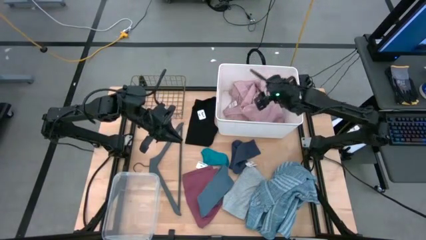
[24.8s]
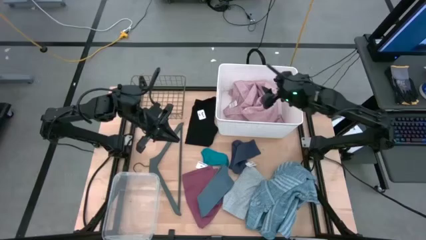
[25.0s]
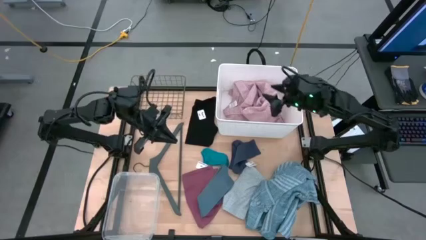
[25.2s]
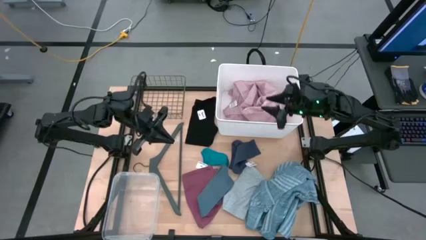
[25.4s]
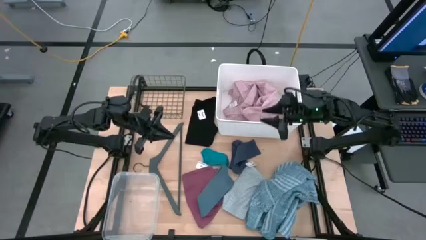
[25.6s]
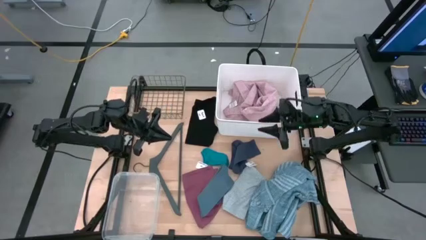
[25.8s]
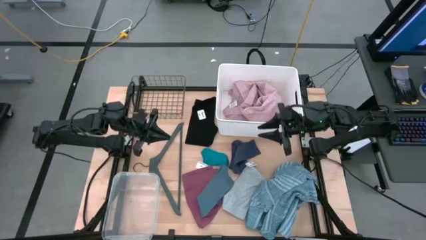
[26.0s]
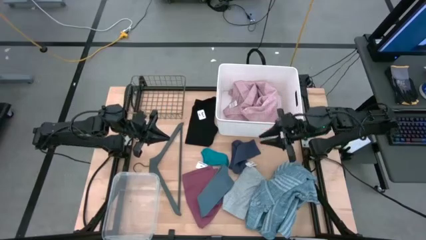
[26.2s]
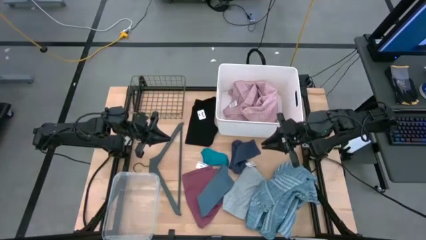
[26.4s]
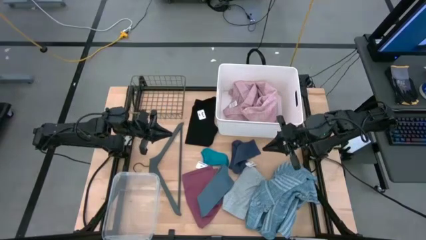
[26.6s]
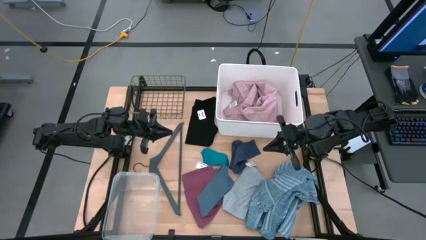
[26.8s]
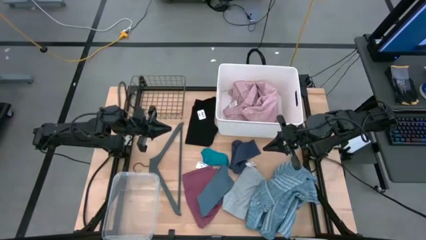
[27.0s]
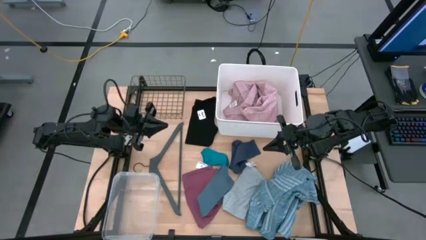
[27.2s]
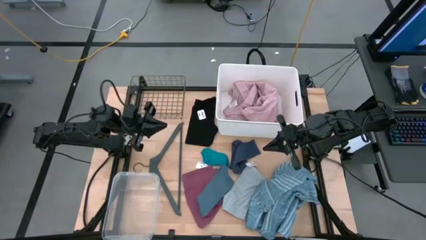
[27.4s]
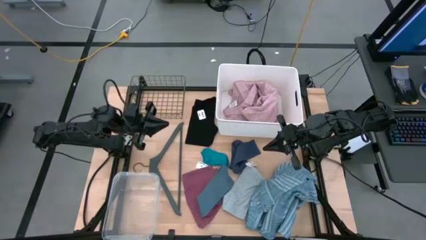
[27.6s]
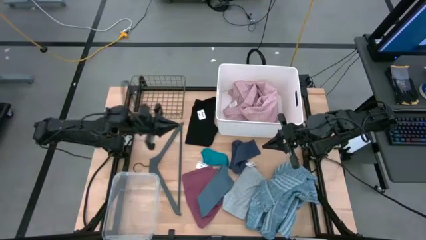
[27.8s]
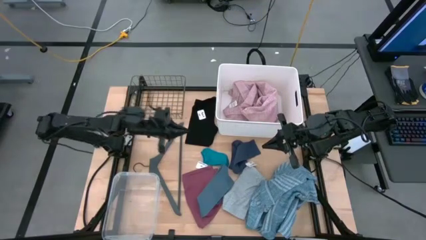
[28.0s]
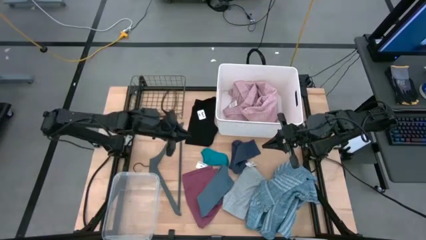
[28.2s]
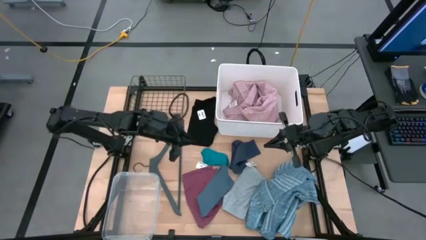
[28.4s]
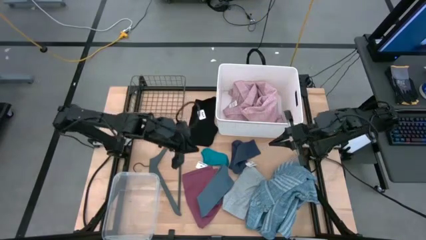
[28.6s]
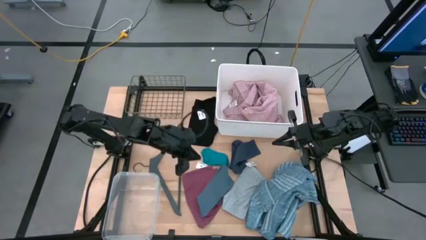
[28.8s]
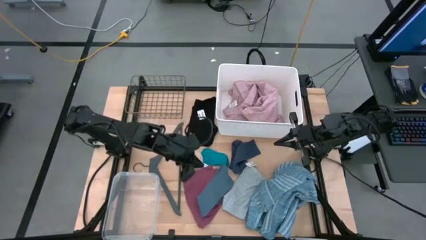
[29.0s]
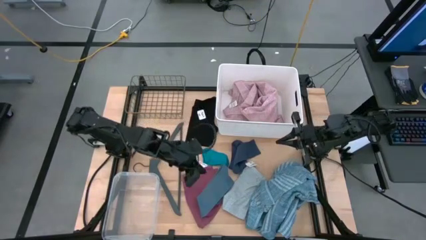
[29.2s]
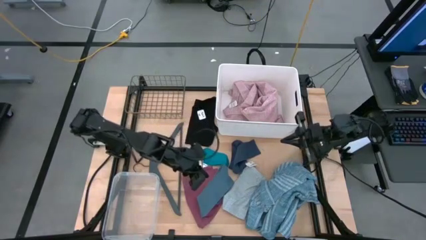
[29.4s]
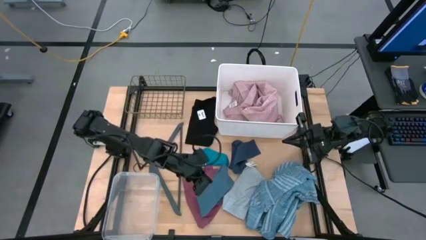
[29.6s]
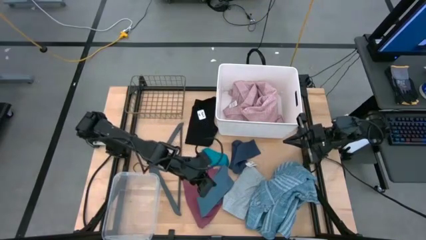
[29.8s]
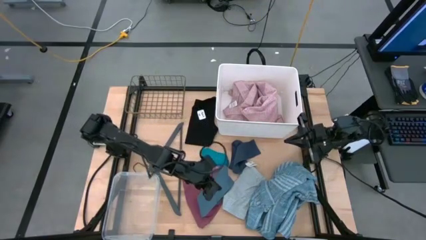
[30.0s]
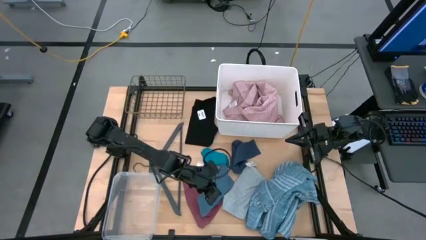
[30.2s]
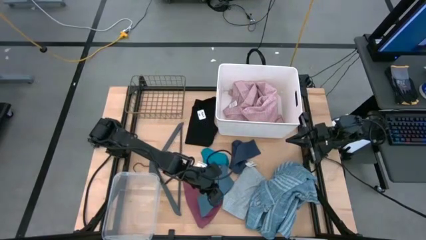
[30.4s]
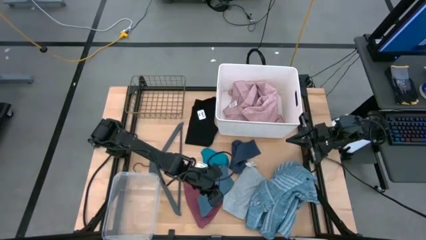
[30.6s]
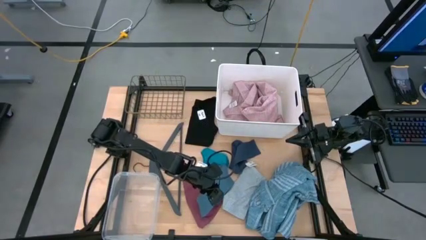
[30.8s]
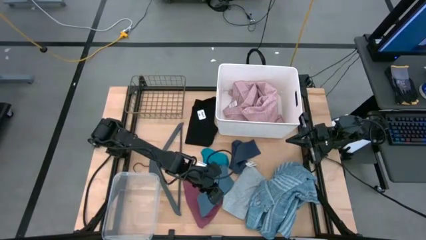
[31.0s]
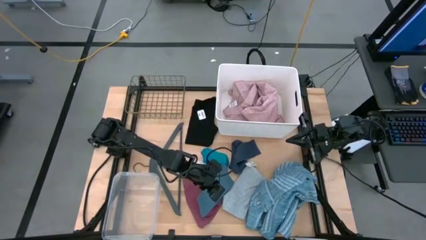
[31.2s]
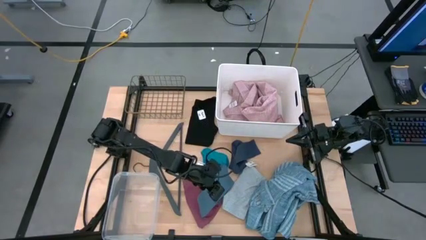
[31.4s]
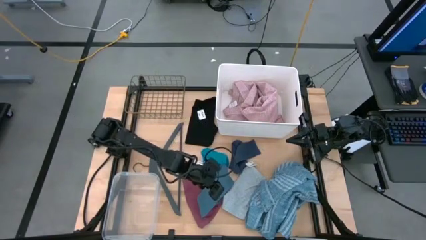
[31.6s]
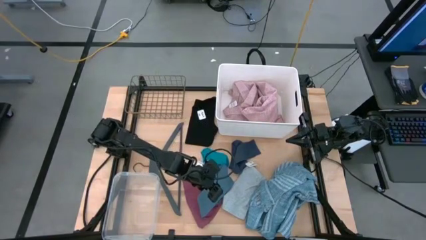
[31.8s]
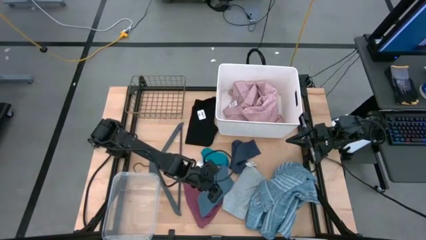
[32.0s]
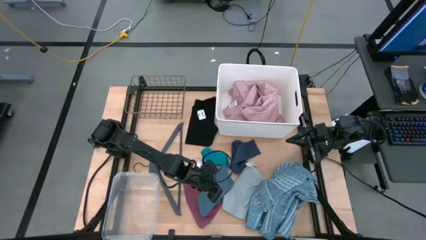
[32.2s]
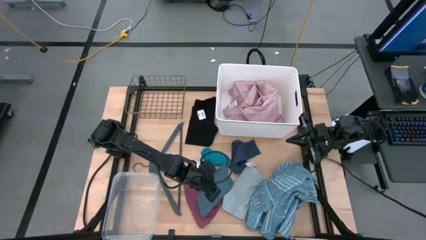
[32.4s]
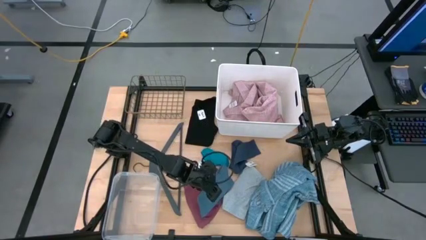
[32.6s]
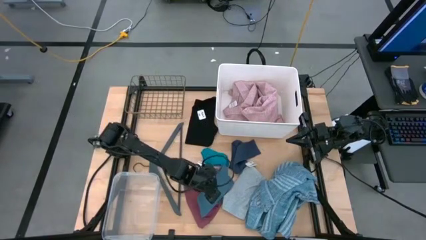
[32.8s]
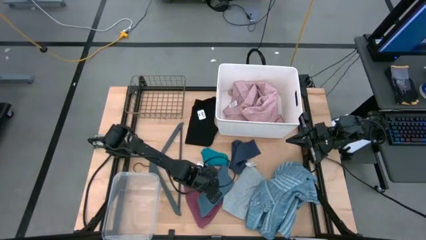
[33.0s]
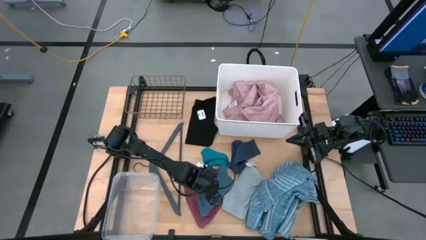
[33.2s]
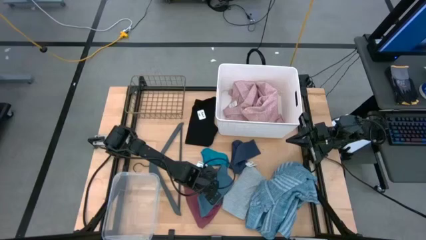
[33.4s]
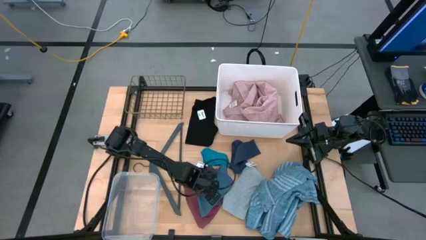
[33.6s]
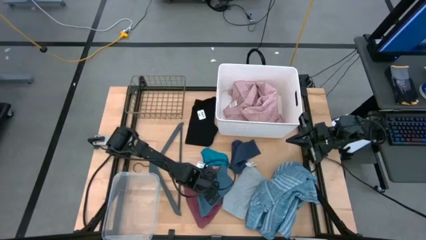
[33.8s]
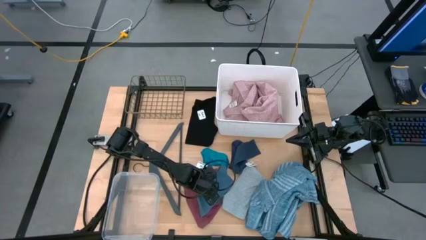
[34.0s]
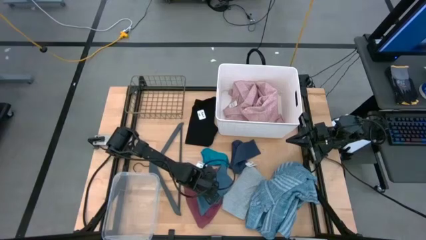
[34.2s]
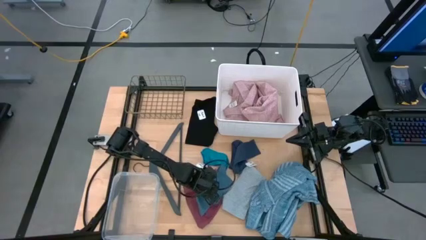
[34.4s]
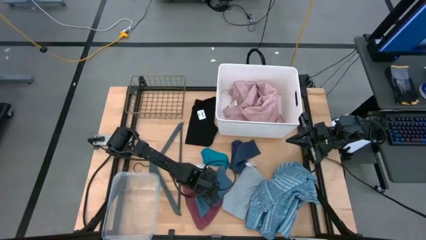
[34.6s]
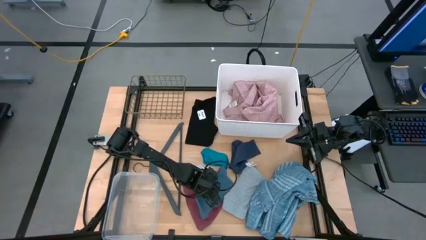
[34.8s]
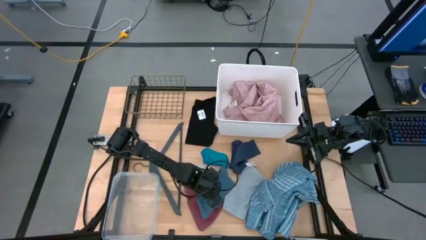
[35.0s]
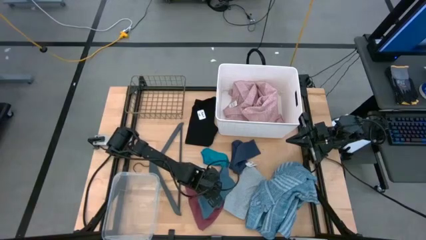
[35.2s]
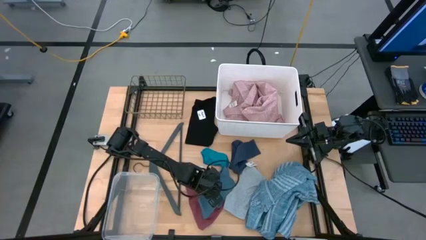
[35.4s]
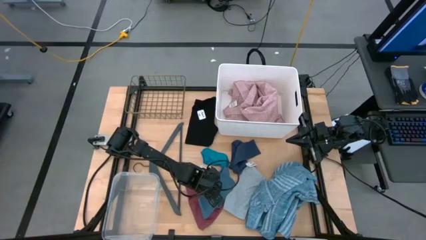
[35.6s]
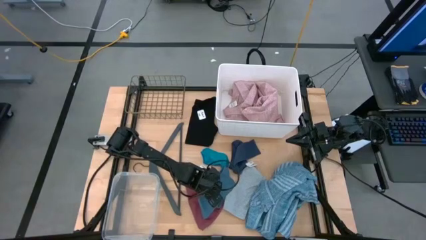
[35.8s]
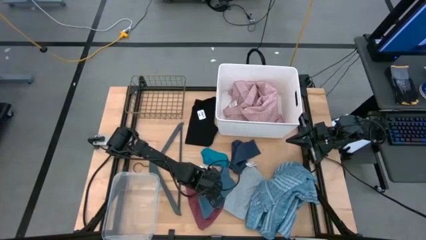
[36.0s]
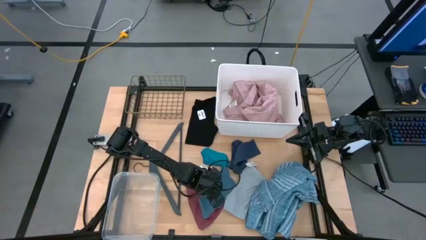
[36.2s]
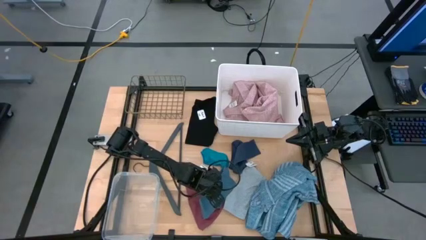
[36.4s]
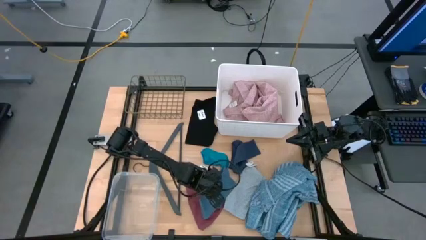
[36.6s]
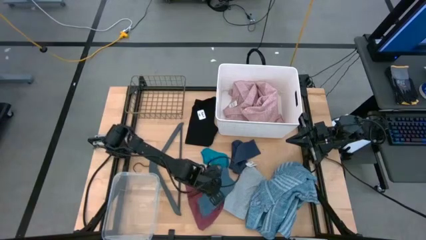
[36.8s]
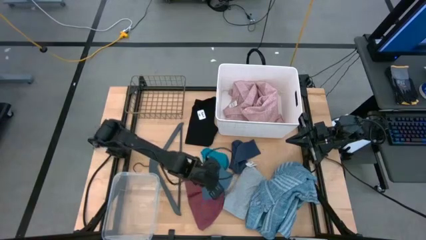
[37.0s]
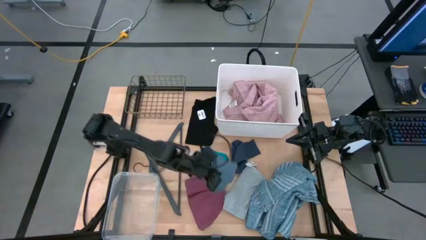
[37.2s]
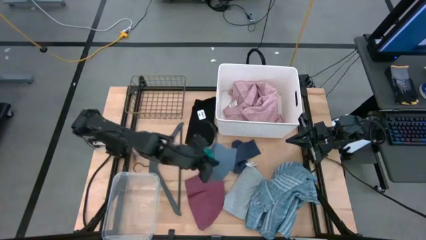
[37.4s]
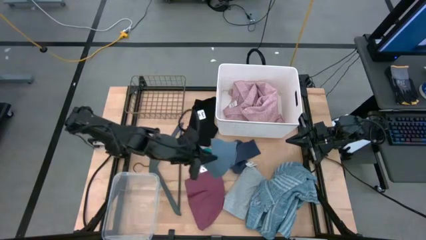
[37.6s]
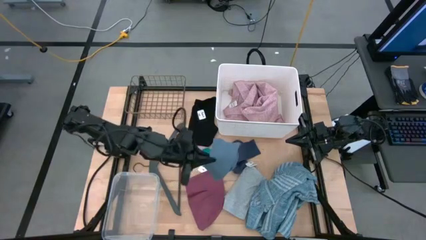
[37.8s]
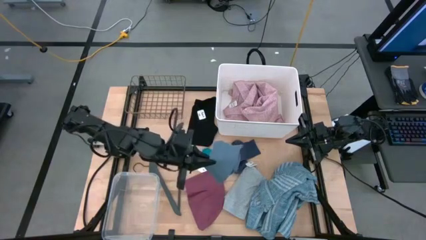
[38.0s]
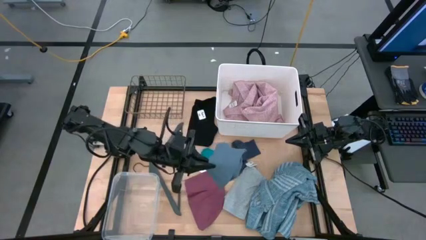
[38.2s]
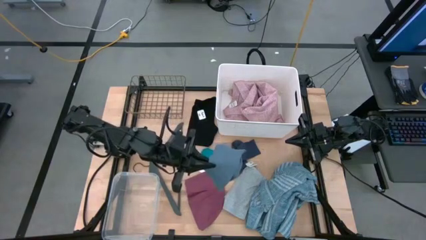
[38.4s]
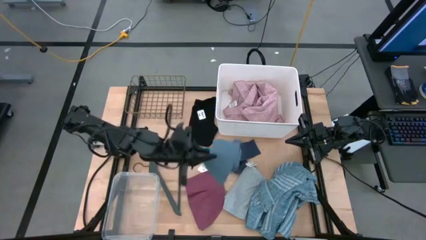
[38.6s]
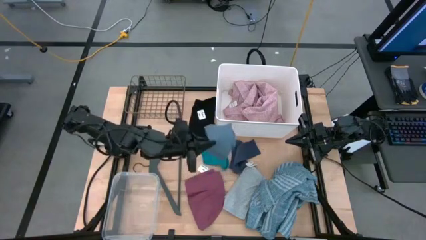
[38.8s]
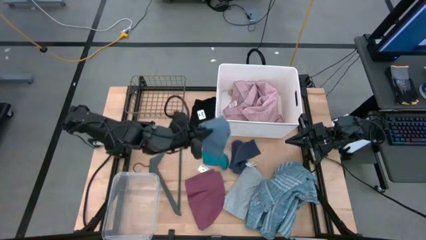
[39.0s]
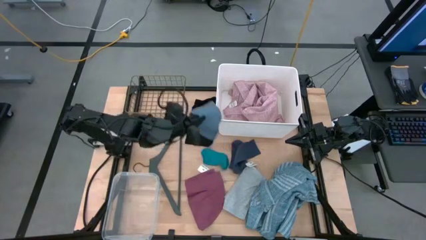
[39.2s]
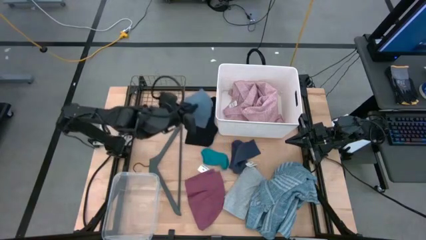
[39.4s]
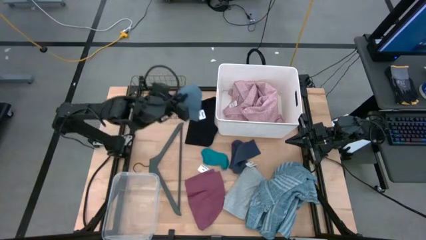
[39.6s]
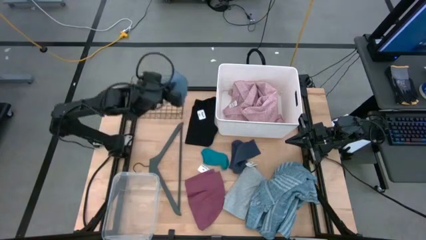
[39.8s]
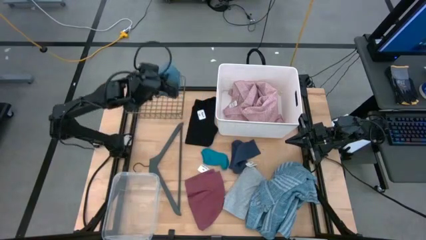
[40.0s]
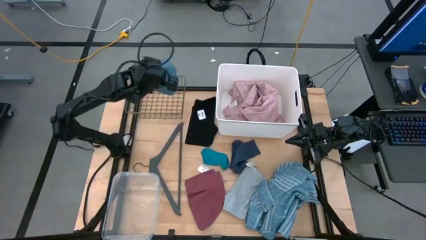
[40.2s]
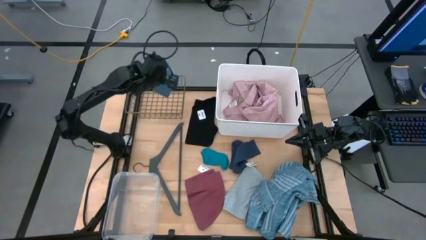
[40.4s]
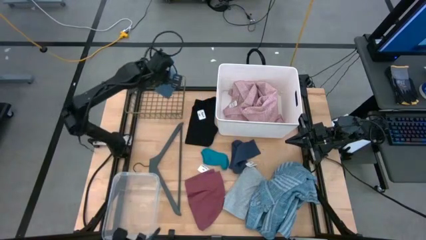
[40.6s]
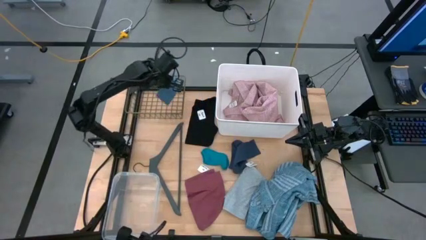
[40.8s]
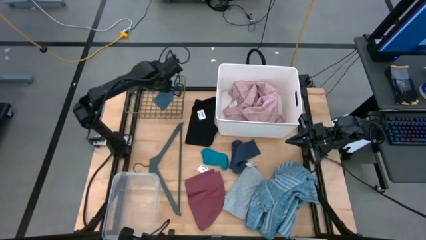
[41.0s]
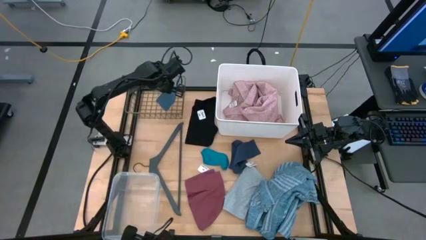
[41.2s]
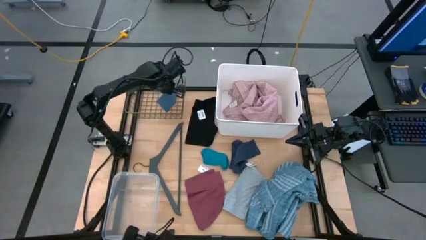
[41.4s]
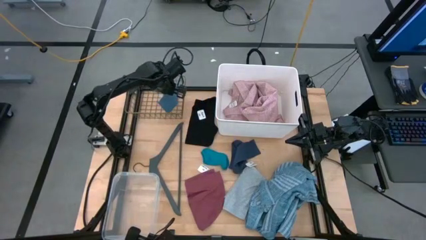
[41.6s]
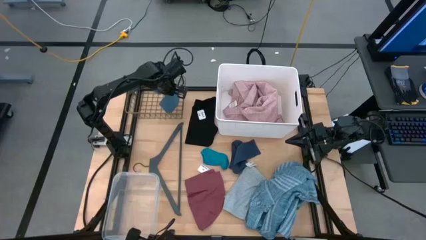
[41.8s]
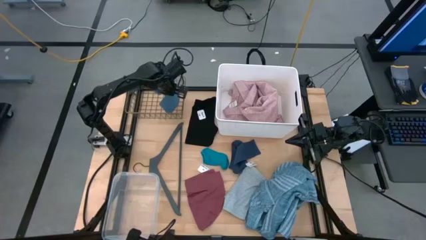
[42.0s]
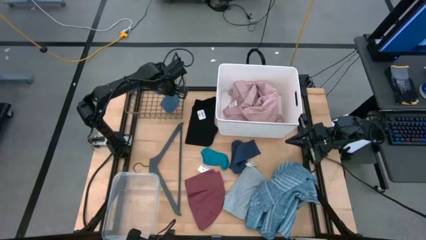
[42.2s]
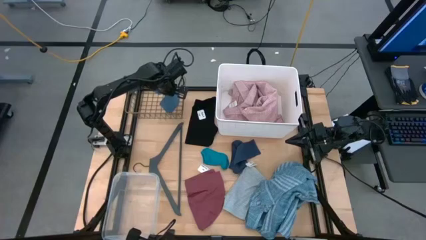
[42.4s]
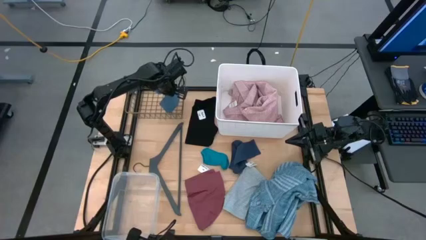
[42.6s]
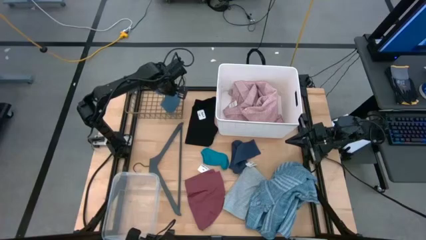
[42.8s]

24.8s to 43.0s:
Task: Pick & Place Cloths
Put the gray sock in the gold wire basket
